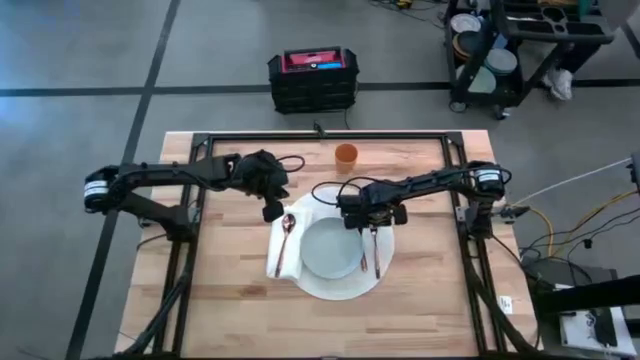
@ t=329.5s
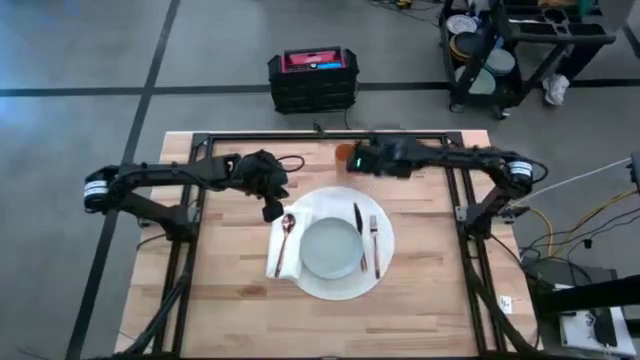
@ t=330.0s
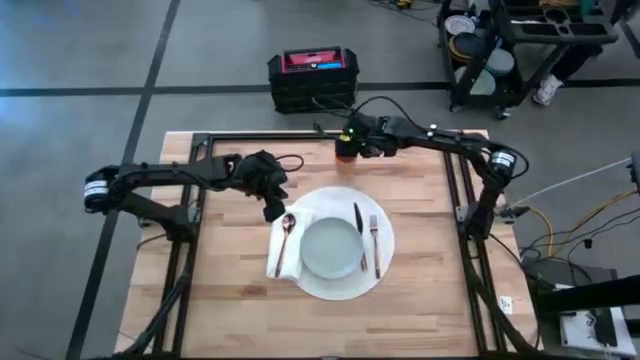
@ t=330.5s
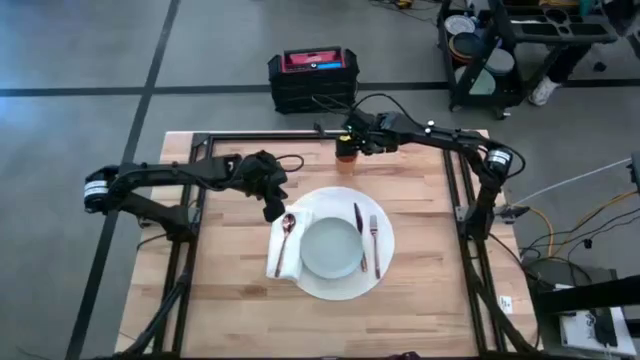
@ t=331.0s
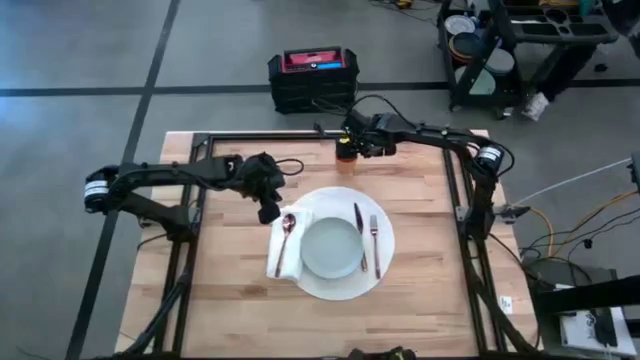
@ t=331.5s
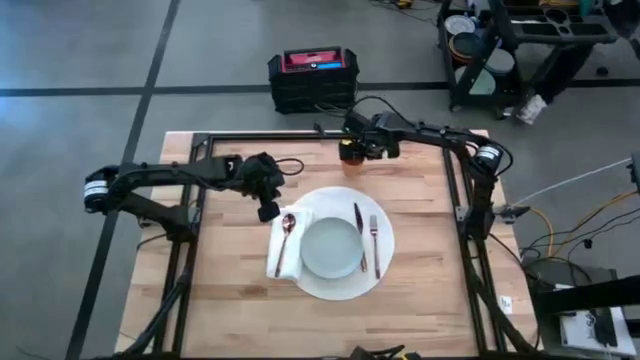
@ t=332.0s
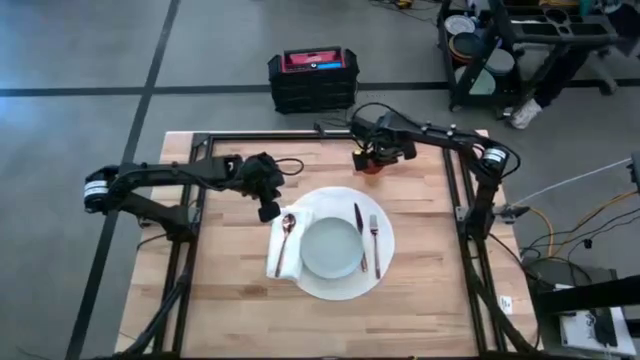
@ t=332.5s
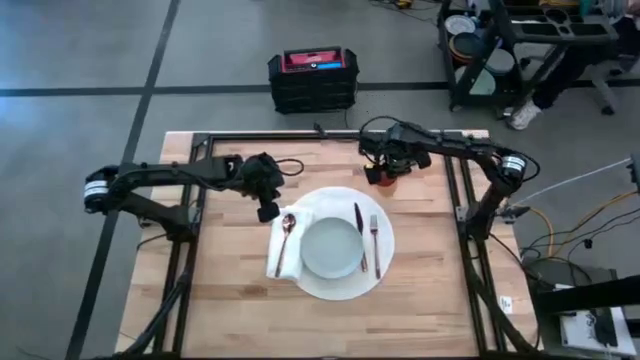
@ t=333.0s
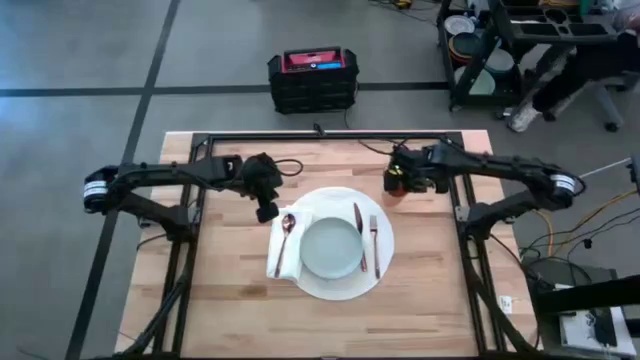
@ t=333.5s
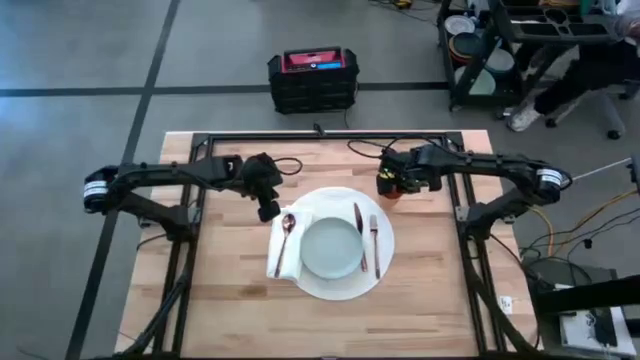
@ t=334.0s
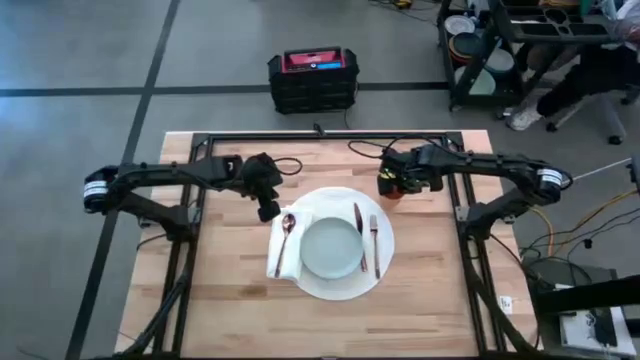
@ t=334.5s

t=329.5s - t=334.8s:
Task: Set table place
Move the orange cup to the top right of the table

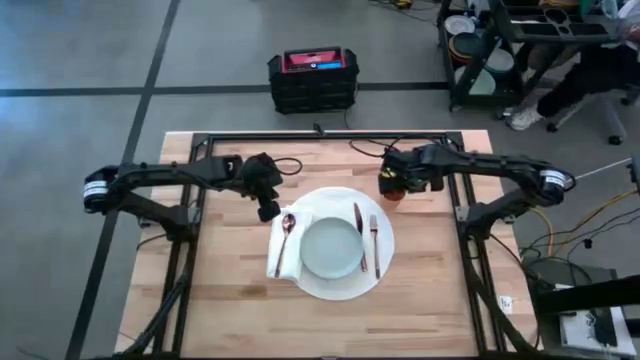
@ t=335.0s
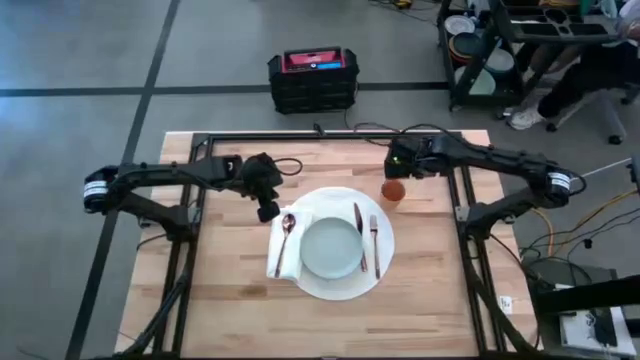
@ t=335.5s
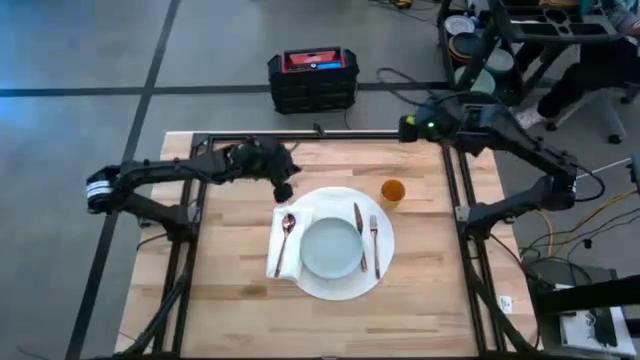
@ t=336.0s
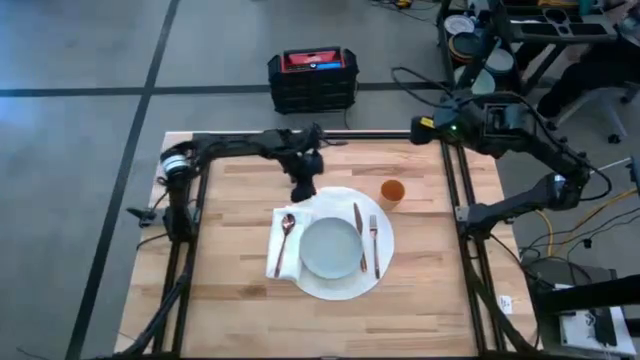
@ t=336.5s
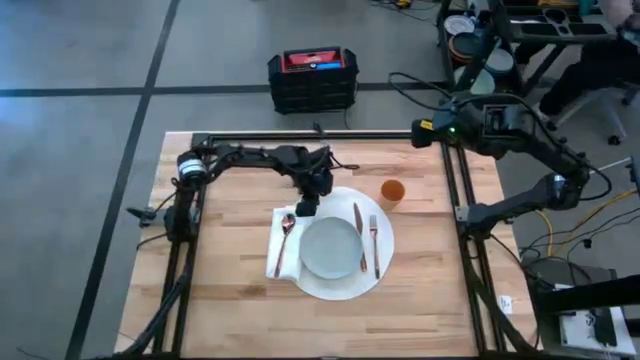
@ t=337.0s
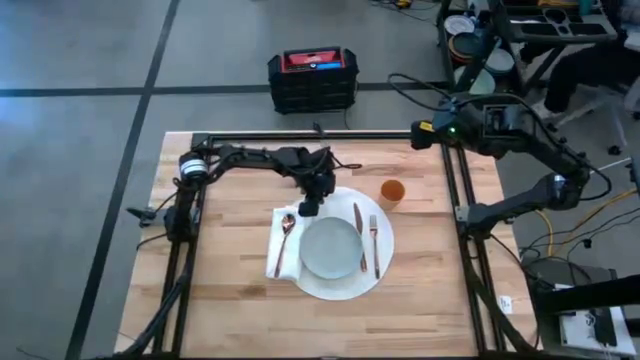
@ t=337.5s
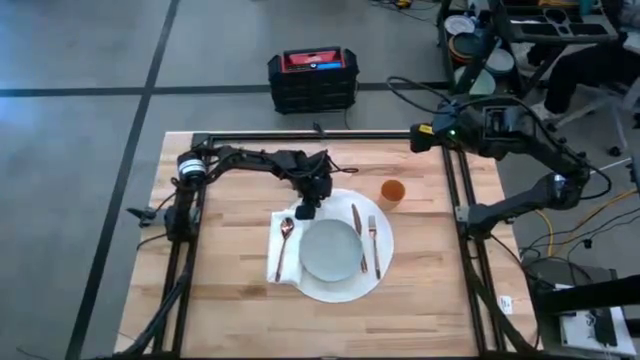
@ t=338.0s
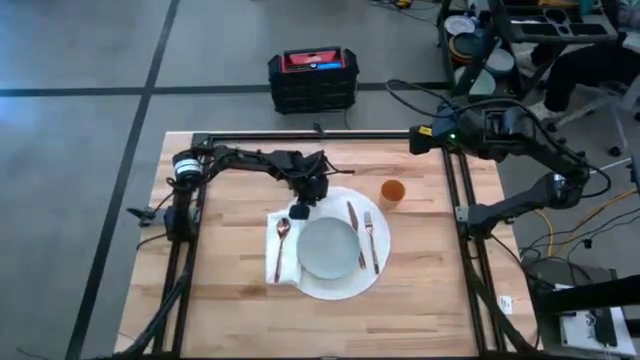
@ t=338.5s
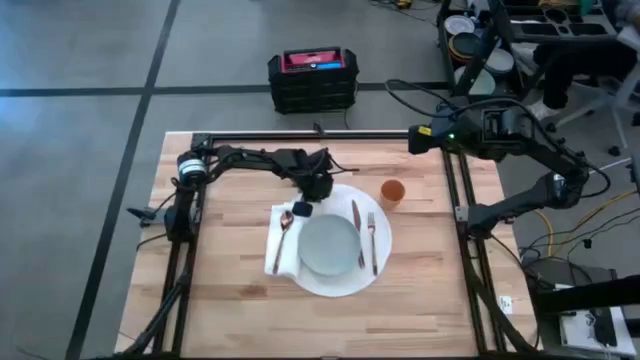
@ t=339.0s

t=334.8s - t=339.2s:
Adjust the white mat on the table

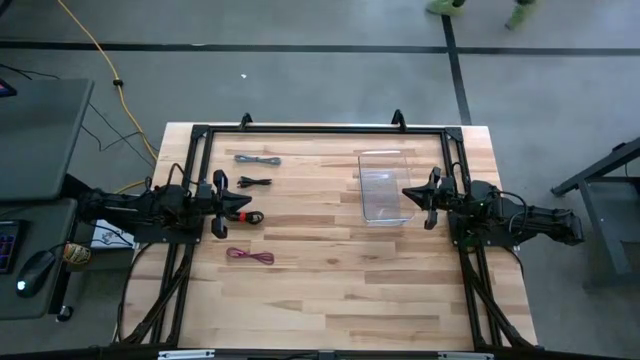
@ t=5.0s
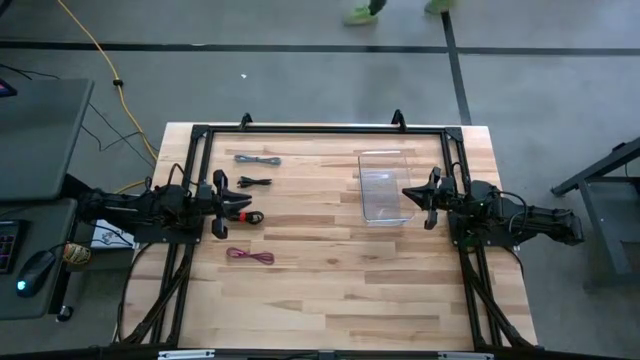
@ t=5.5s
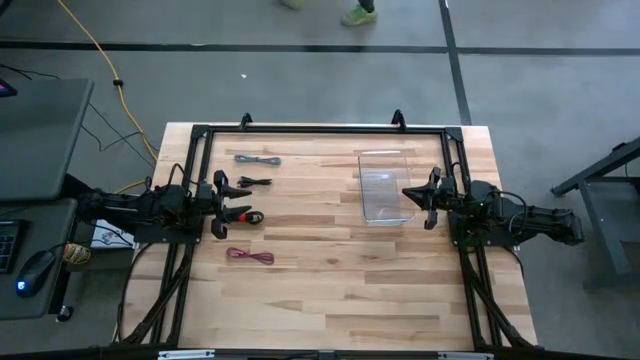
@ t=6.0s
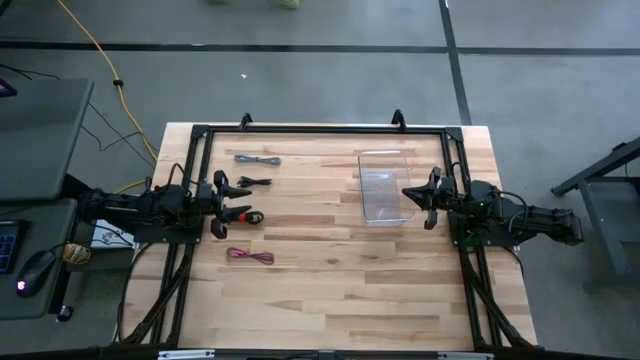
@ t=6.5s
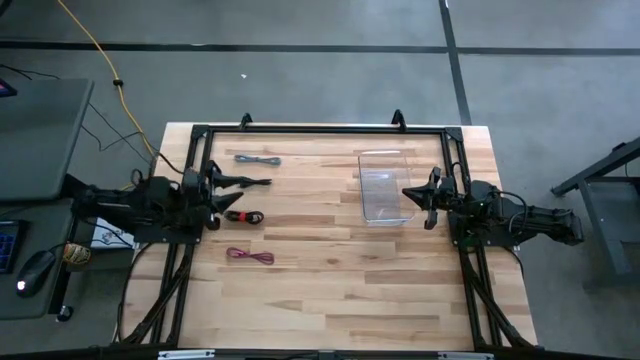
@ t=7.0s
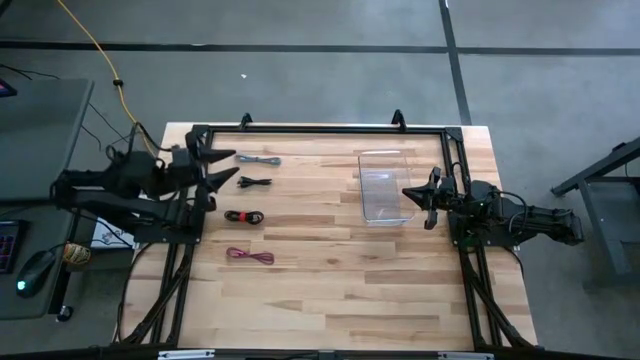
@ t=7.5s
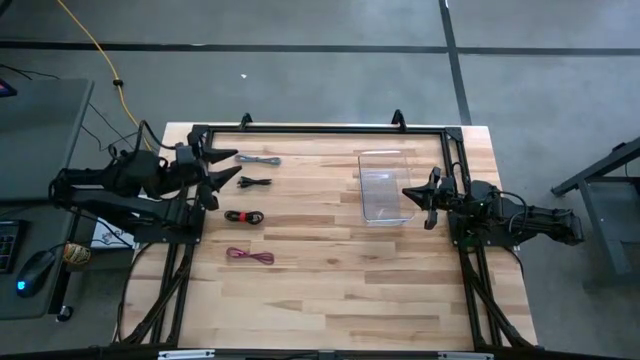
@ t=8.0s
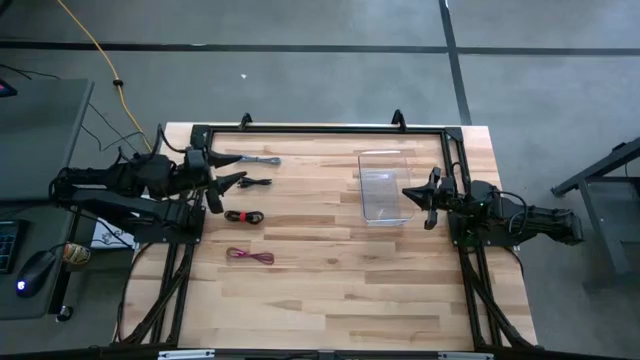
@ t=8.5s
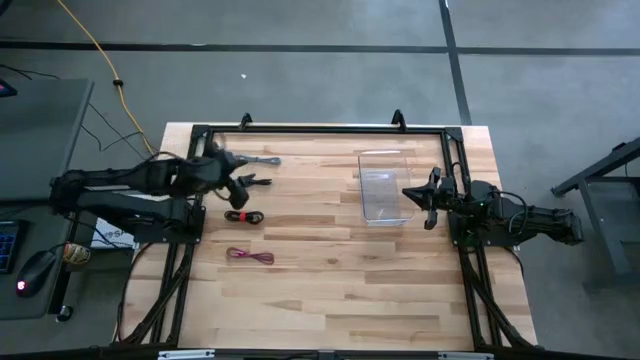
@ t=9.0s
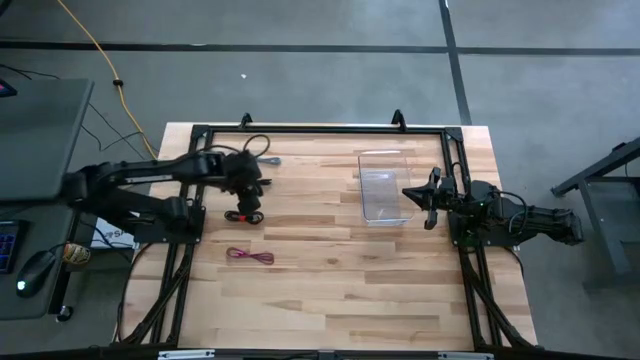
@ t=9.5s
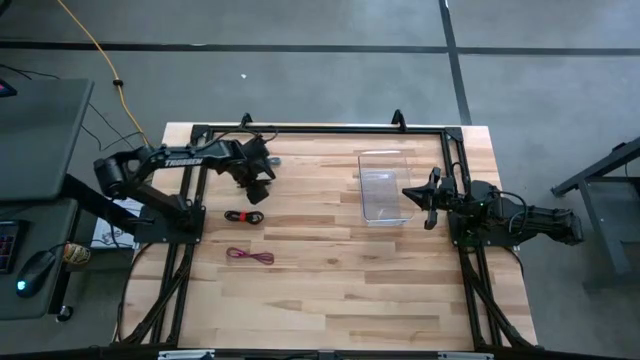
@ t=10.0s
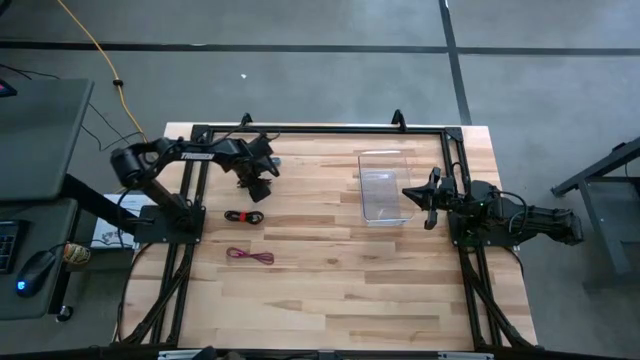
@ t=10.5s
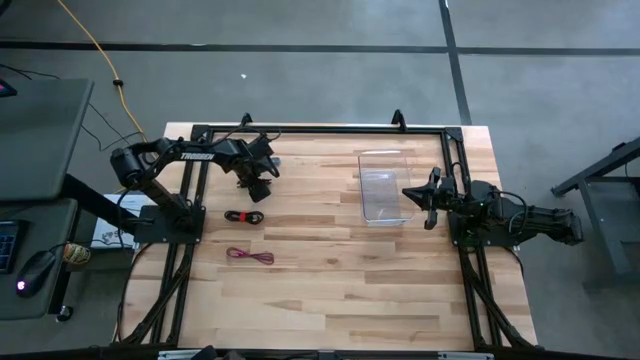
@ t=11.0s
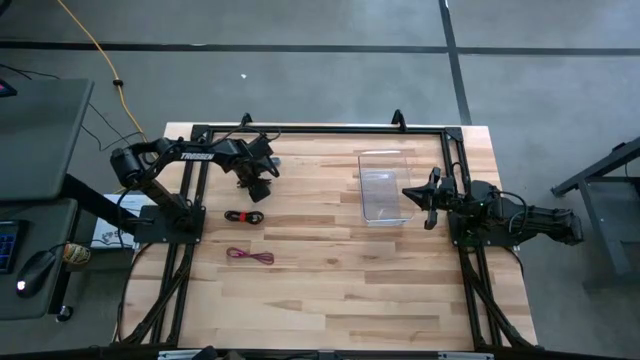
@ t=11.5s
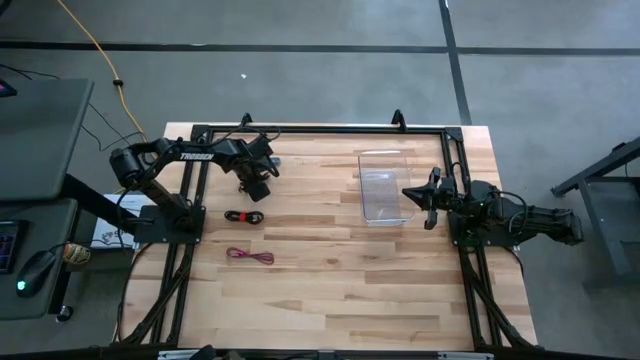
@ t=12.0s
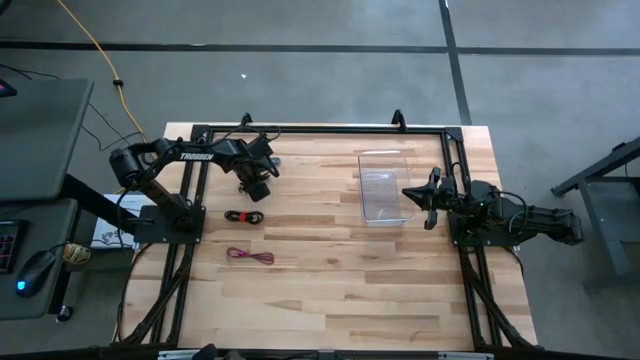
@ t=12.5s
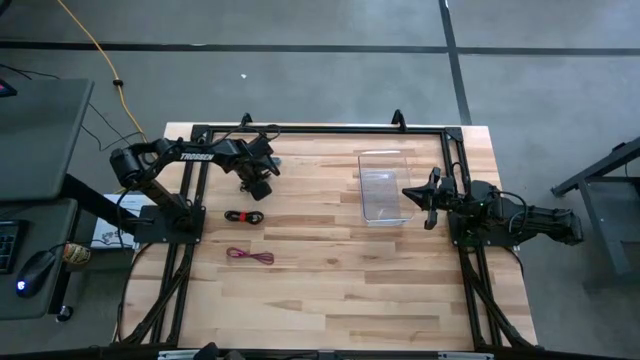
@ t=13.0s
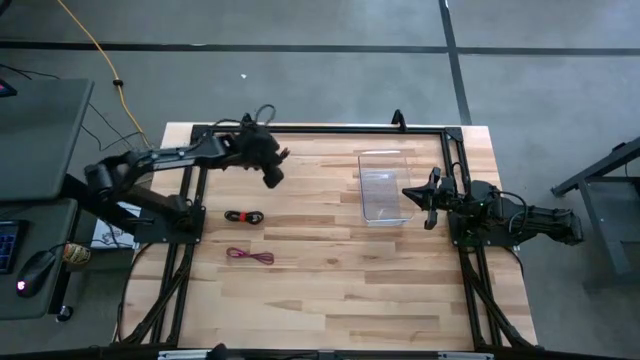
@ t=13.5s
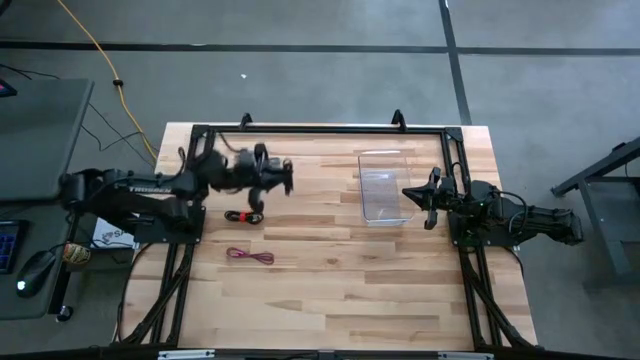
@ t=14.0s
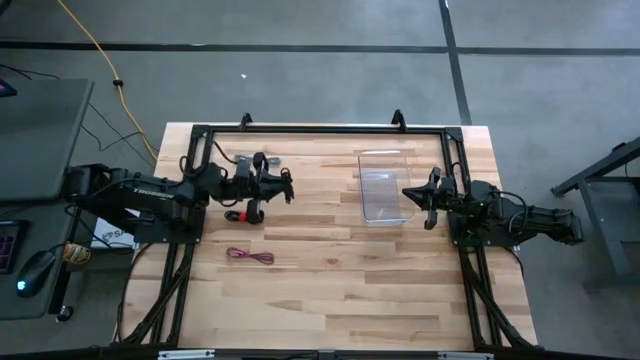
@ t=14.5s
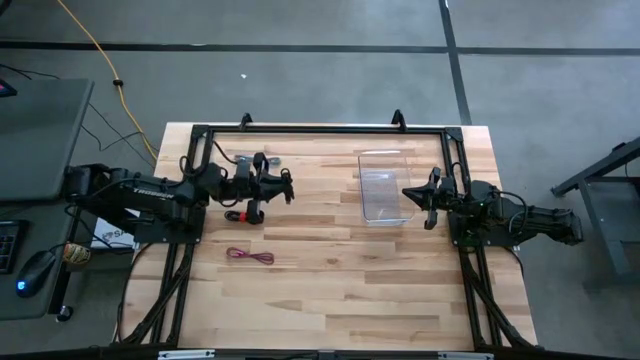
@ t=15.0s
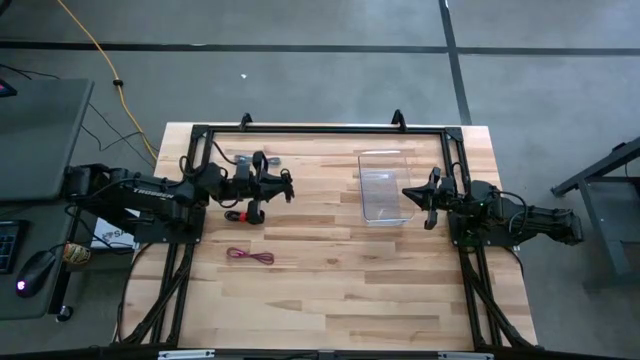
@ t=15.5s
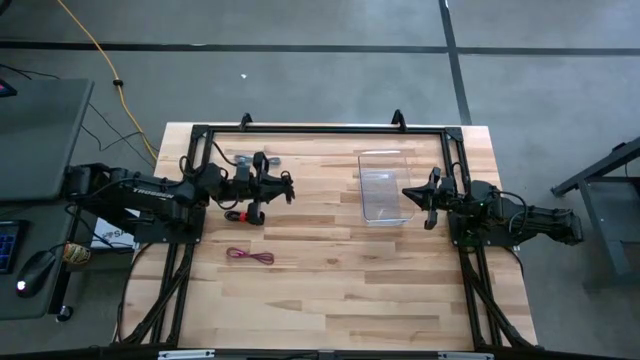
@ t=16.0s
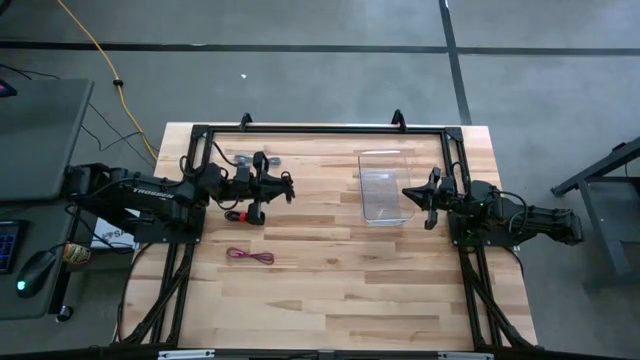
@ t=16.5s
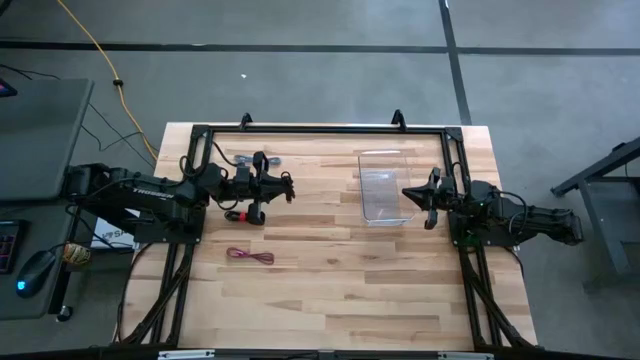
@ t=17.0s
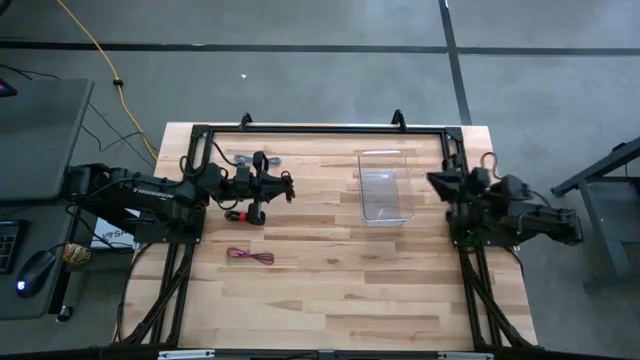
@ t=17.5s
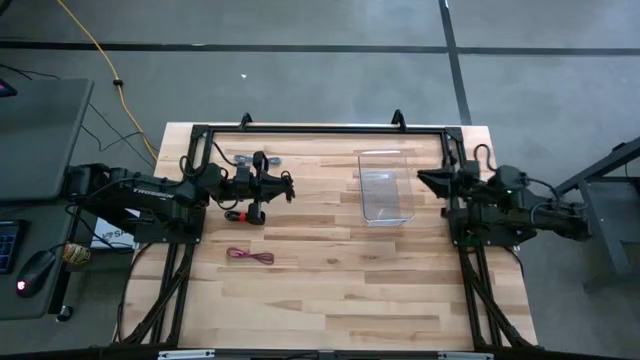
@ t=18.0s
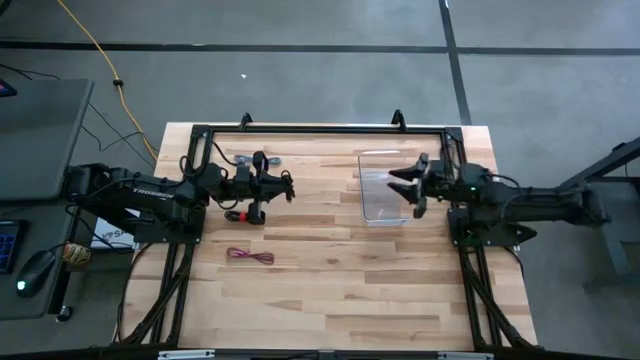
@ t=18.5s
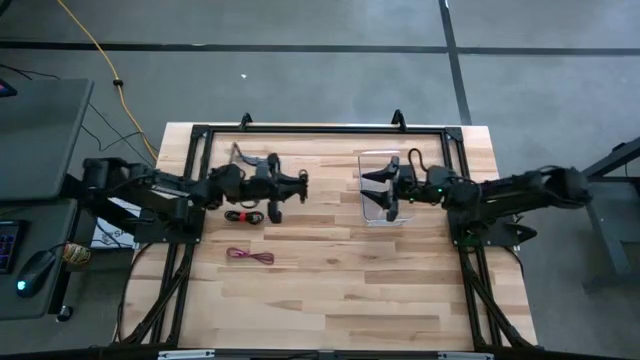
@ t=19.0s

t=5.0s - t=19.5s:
Task: Pick and place USB-C Cables
Put the black cable charger into the transparent bin
